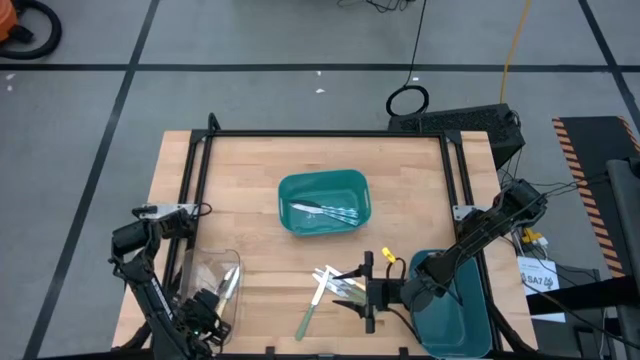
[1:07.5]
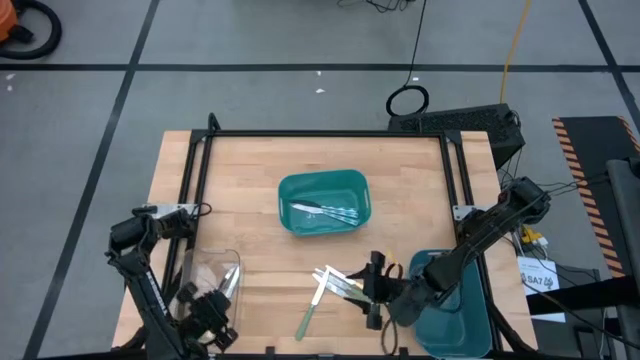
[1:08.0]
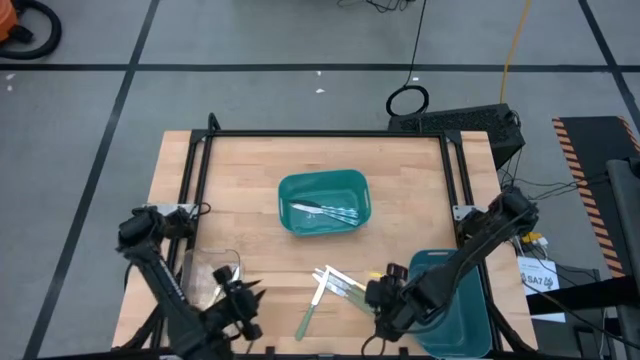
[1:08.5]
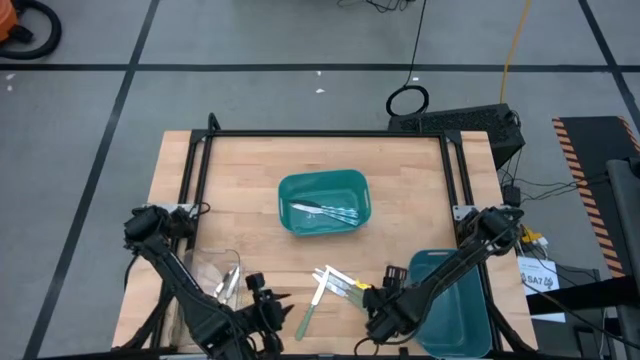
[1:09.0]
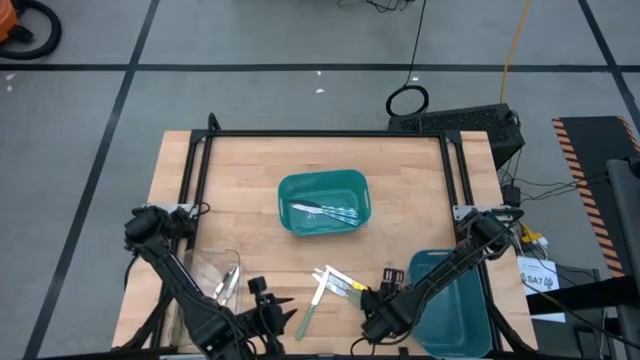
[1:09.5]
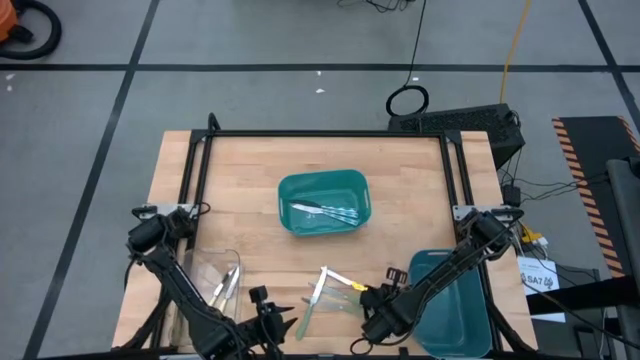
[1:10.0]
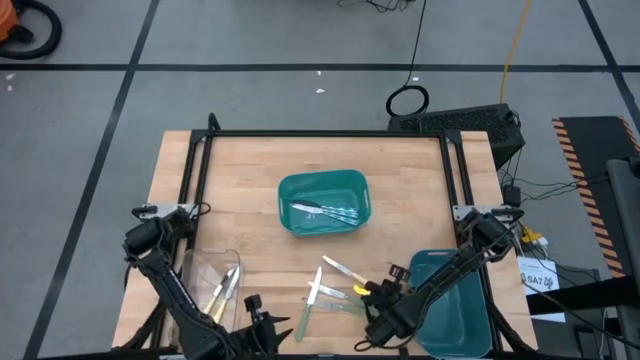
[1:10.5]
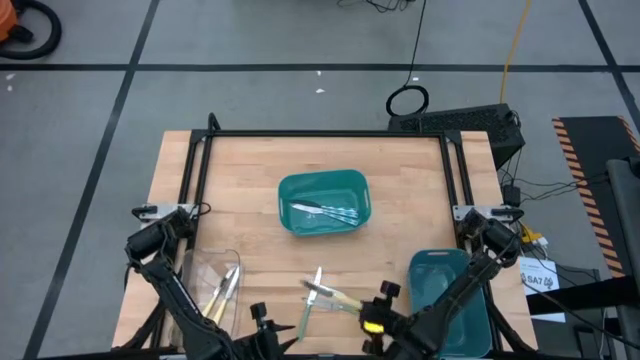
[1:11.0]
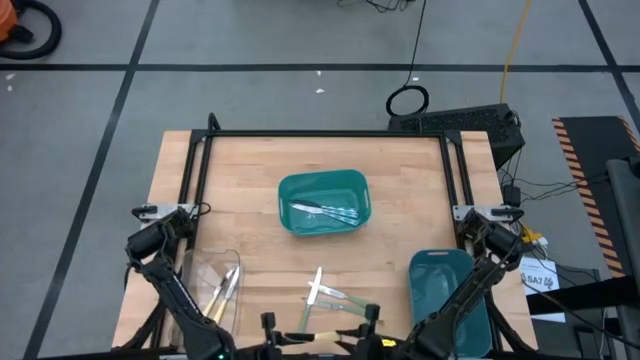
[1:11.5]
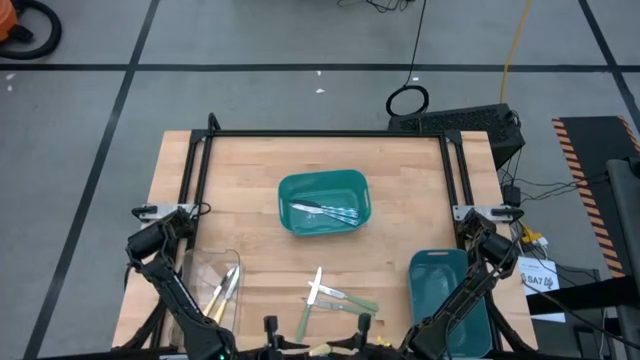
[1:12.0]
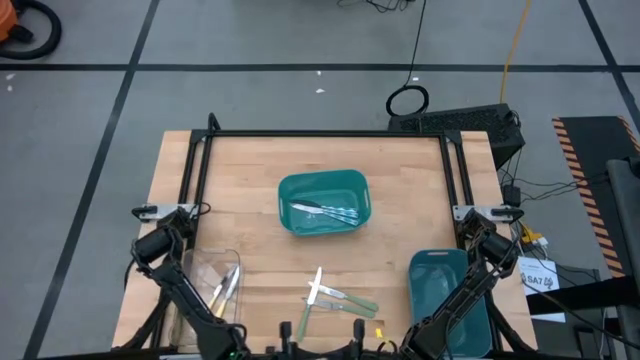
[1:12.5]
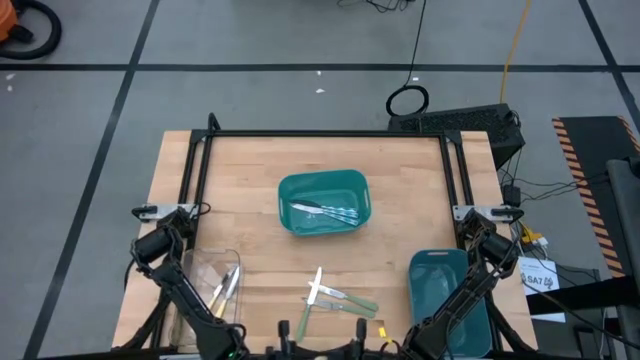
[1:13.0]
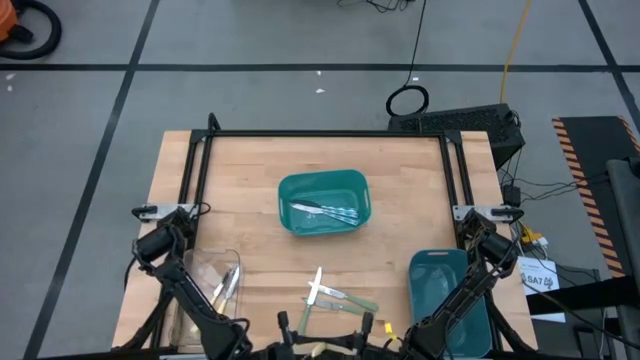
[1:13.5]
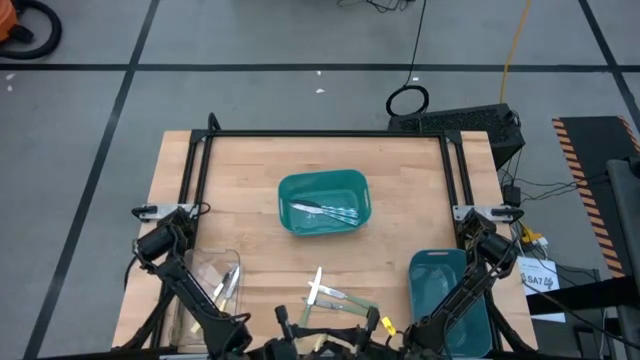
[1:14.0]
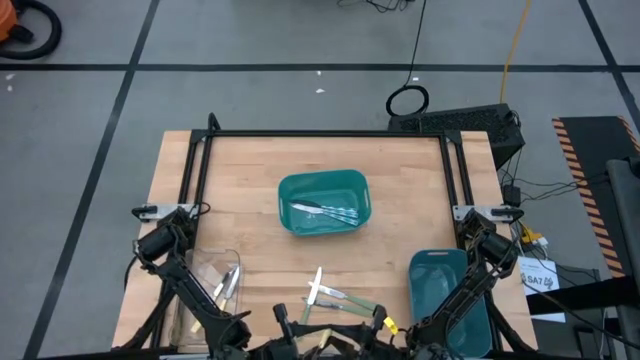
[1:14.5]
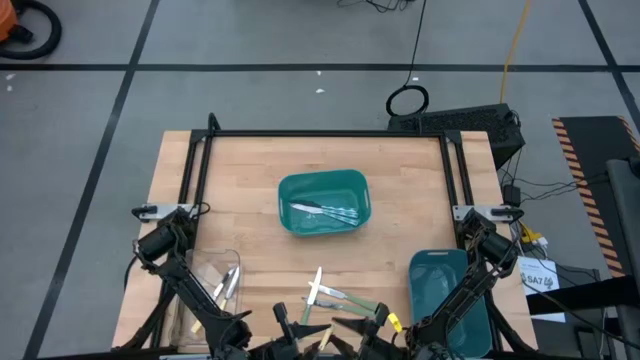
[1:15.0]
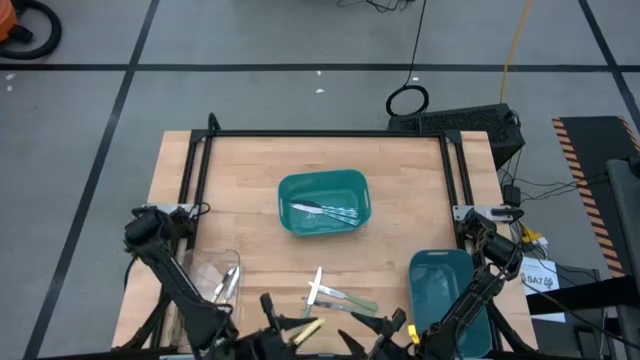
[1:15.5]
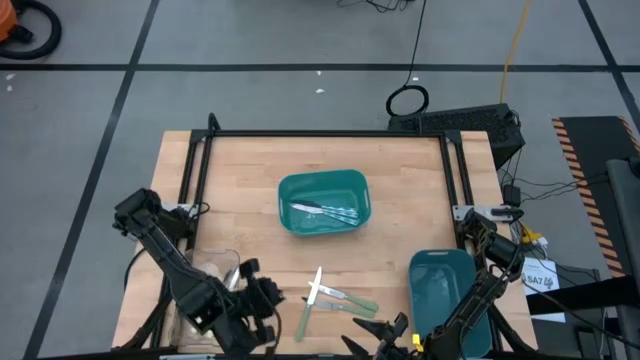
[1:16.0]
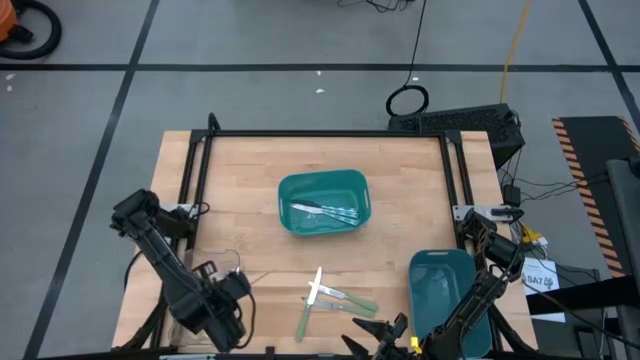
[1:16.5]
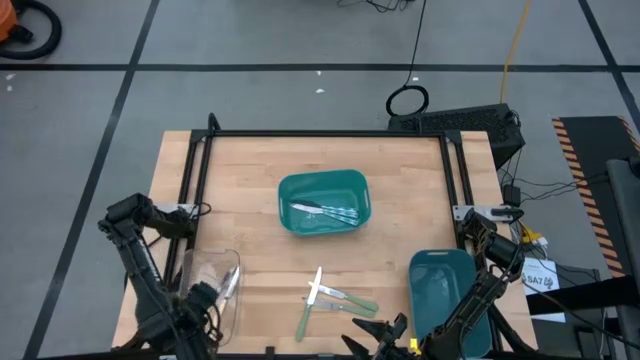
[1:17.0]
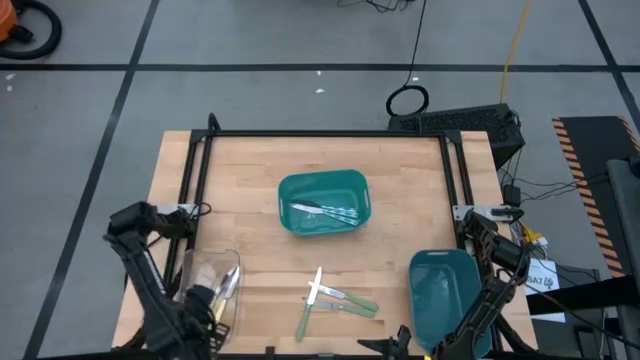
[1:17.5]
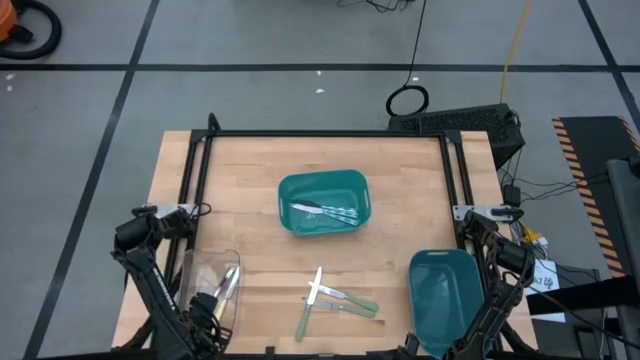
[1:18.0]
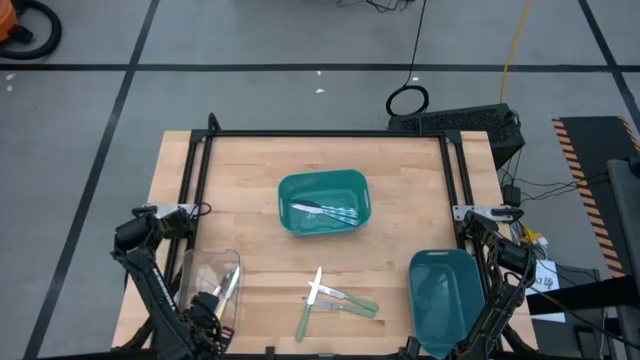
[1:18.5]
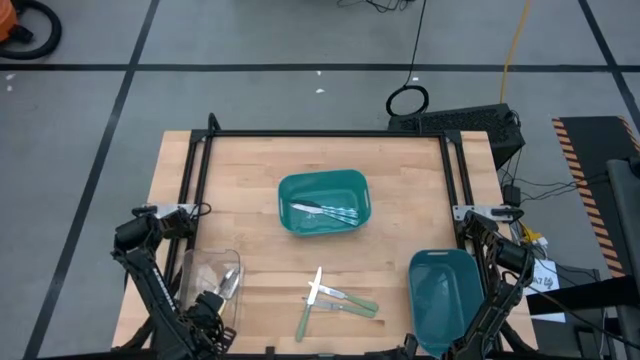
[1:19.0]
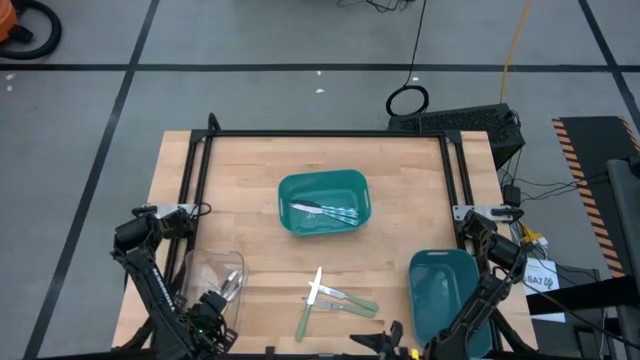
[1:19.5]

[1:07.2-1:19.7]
Task: Sort silverware by color (type)
Put the yellow knife into the transparent bin

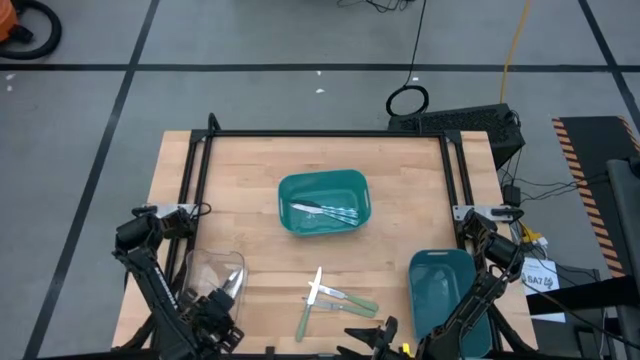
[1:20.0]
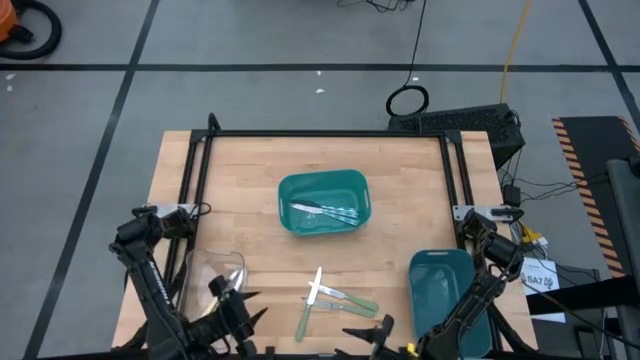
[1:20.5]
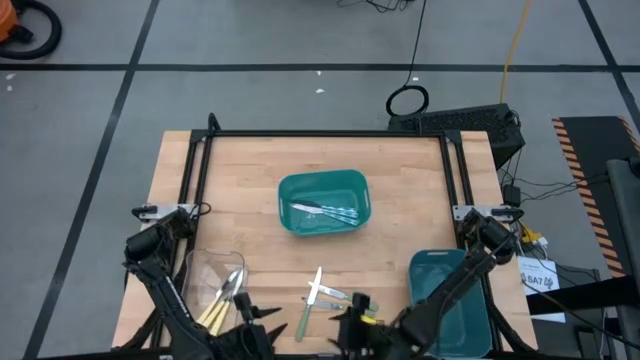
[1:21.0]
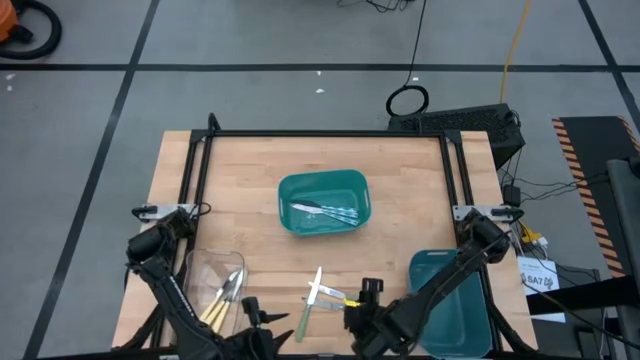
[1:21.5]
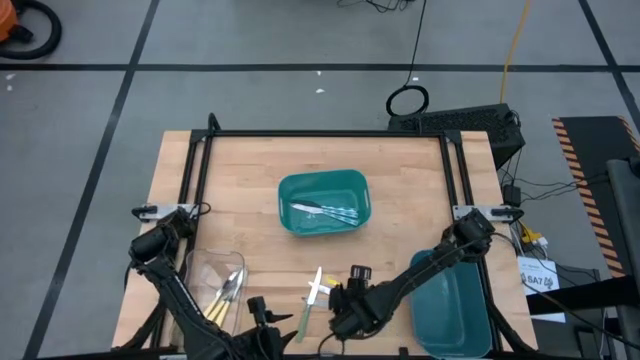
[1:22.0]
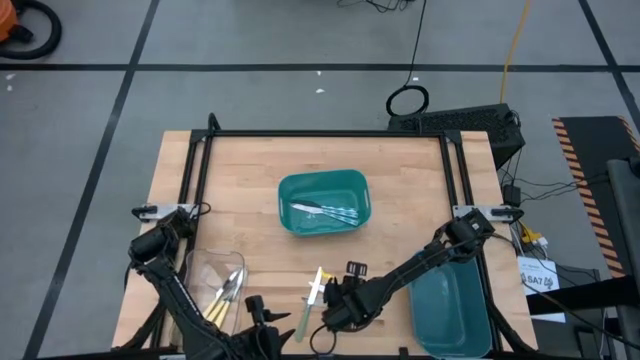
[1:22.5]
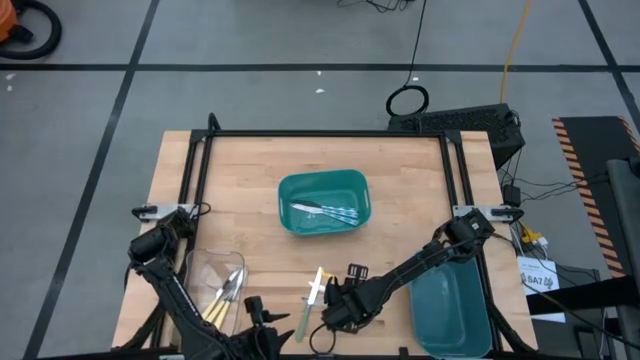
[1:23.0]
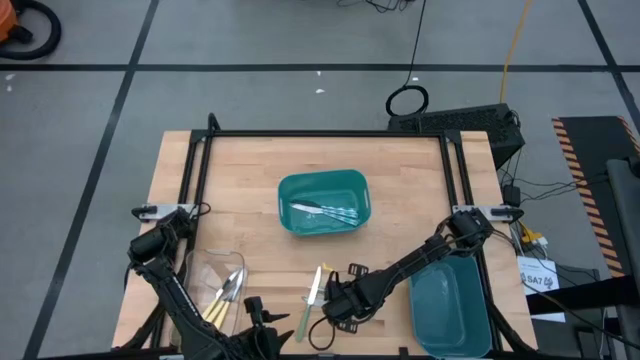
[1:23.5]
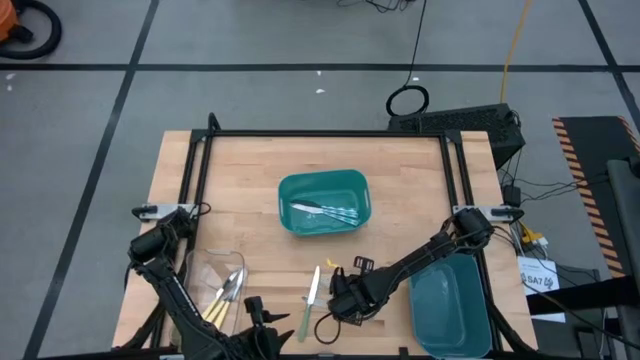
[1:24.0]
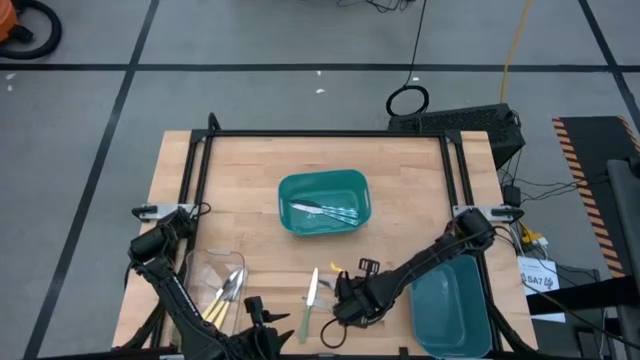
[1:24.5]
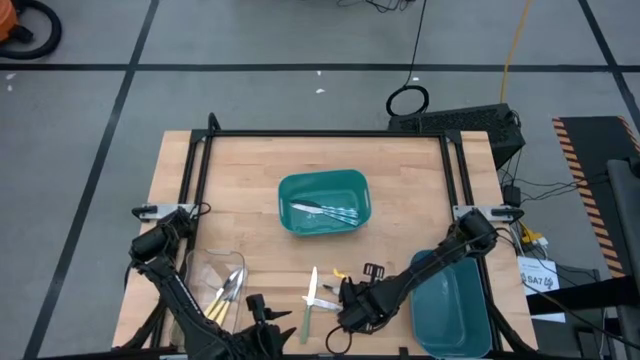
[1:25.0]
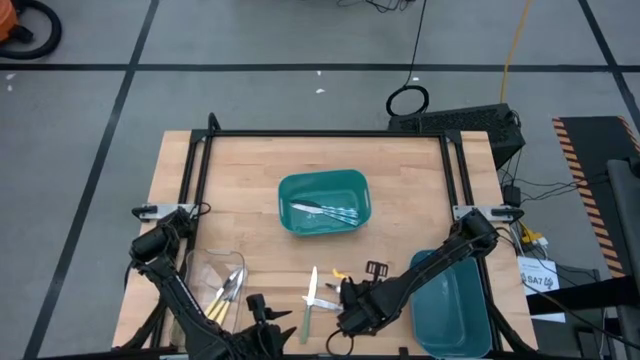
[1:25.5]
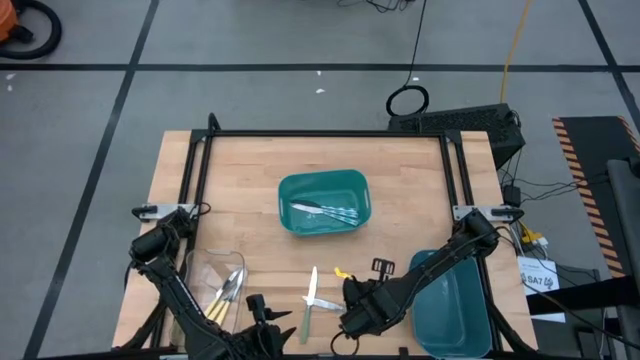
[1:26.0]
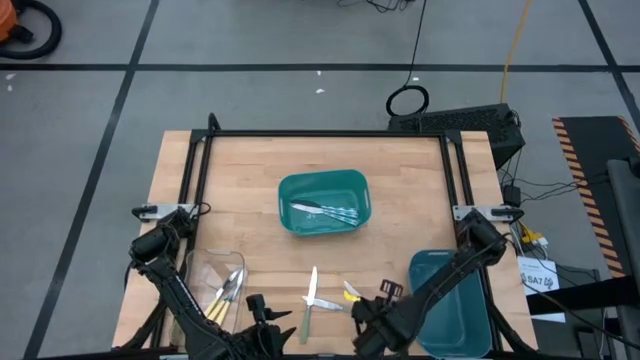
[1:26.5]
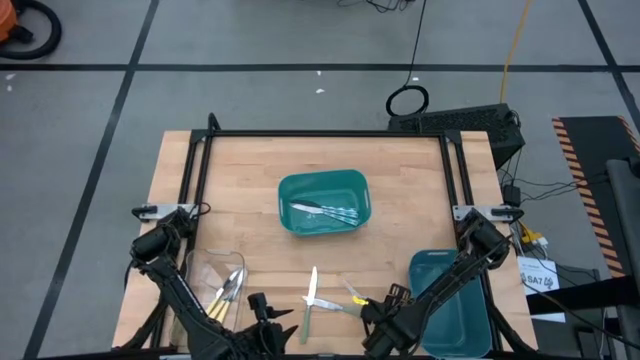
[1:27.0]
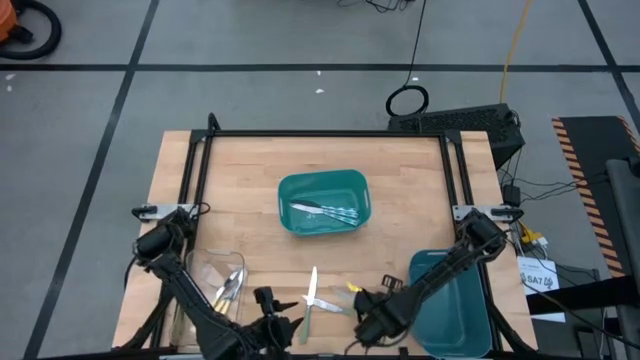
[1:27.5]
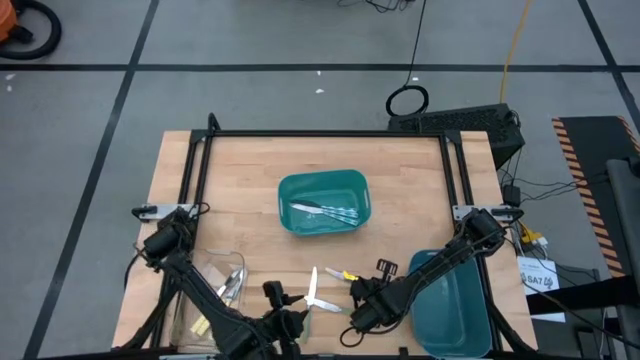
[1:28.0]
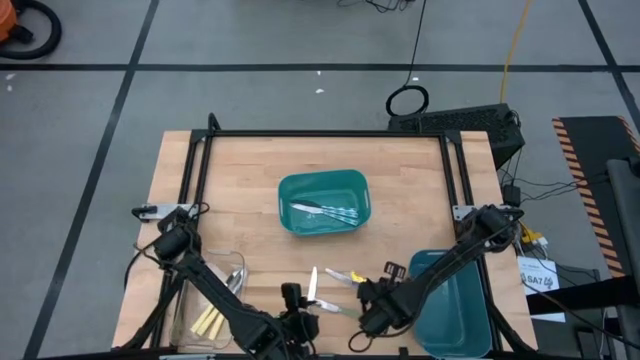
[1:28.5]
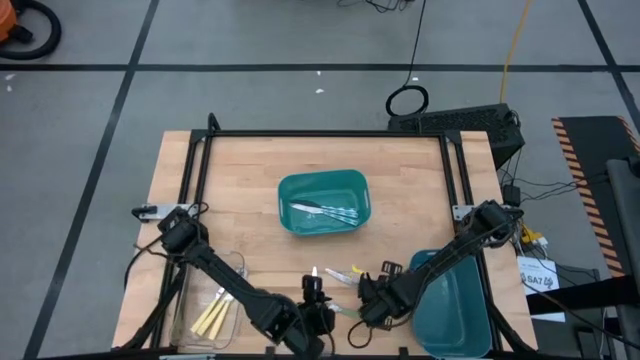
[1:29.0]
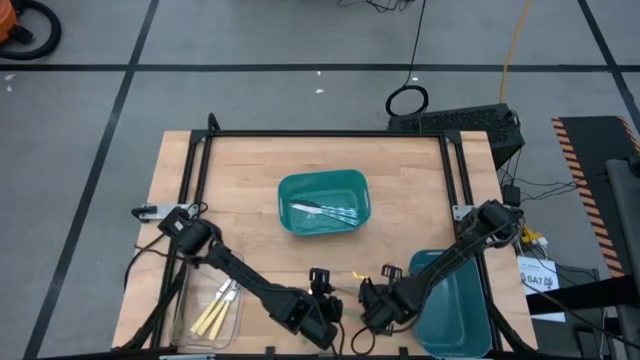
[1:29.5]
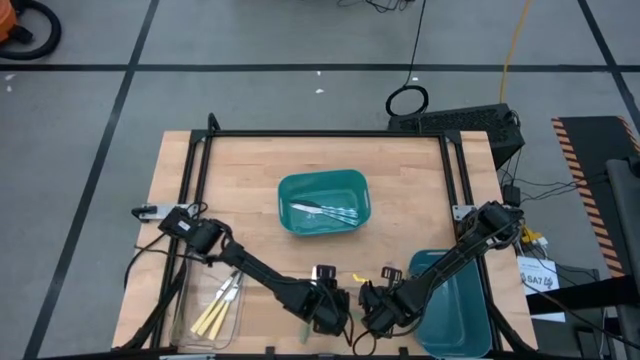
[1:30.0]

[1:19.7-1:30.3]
Put the top green knife into the blue bin
